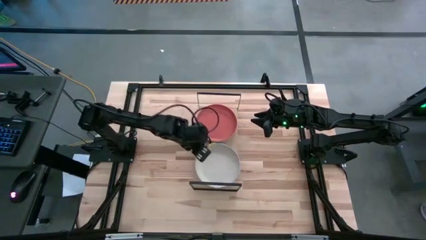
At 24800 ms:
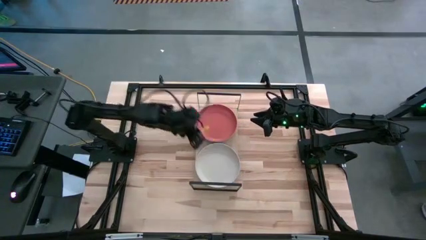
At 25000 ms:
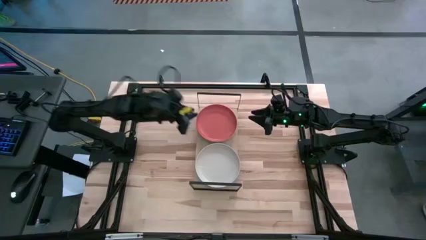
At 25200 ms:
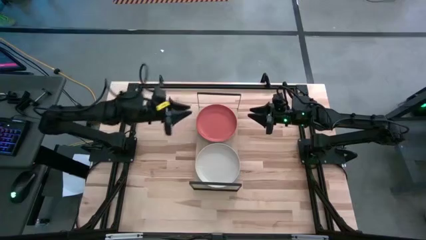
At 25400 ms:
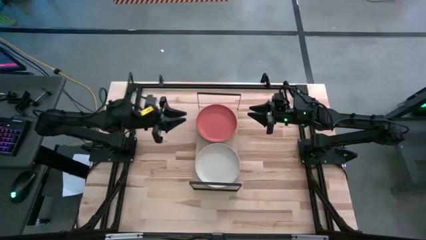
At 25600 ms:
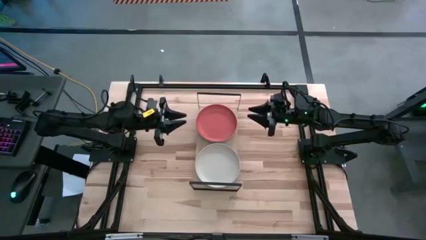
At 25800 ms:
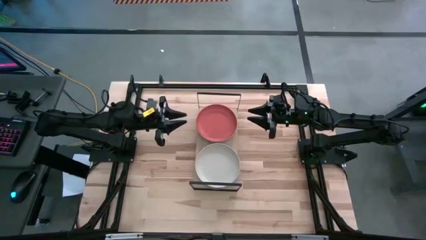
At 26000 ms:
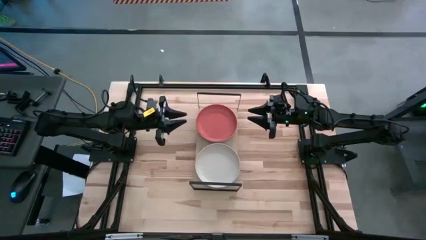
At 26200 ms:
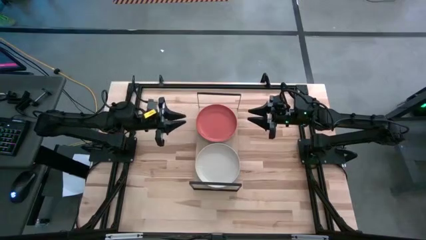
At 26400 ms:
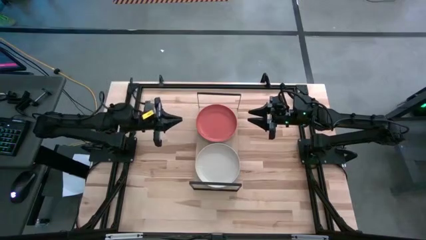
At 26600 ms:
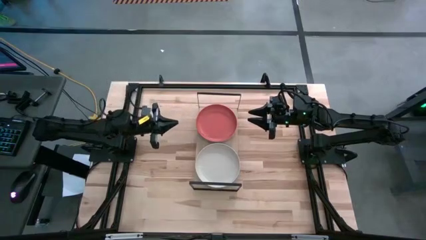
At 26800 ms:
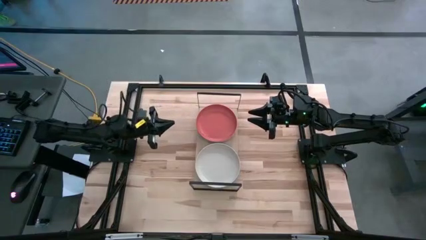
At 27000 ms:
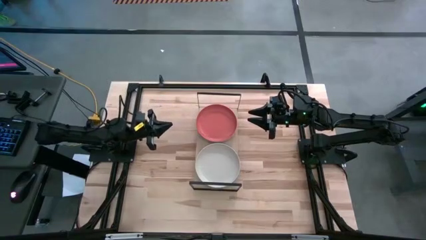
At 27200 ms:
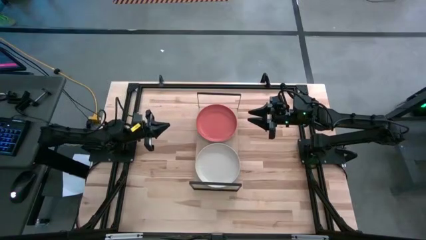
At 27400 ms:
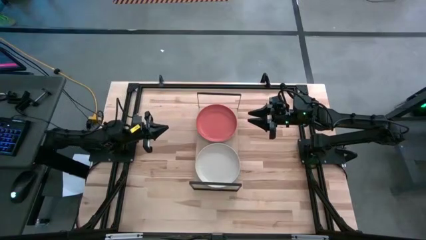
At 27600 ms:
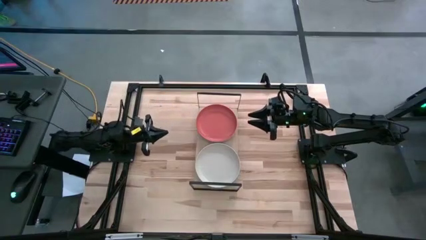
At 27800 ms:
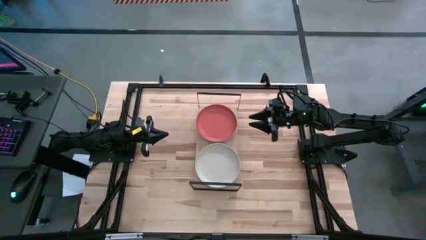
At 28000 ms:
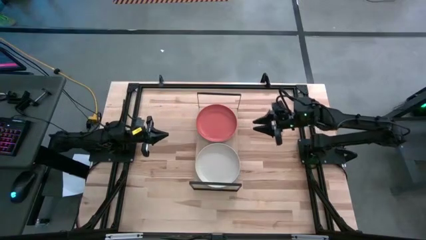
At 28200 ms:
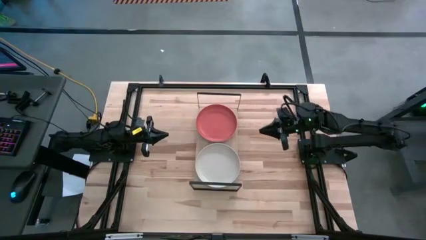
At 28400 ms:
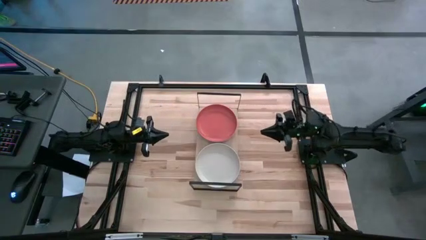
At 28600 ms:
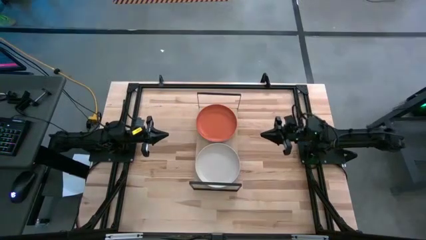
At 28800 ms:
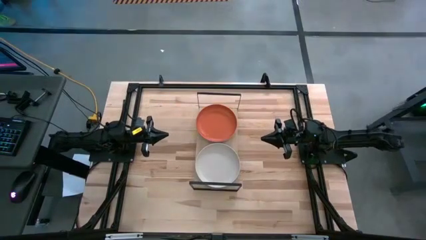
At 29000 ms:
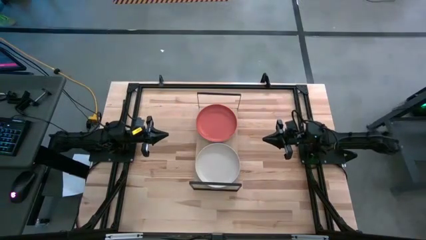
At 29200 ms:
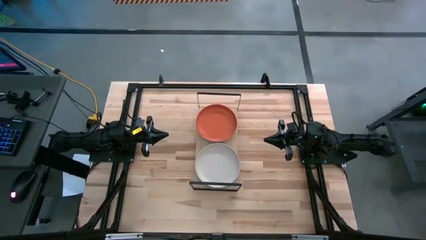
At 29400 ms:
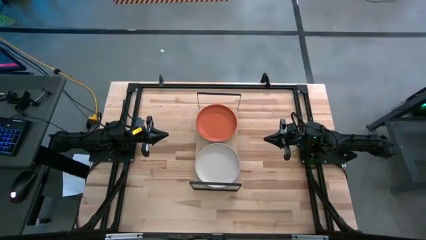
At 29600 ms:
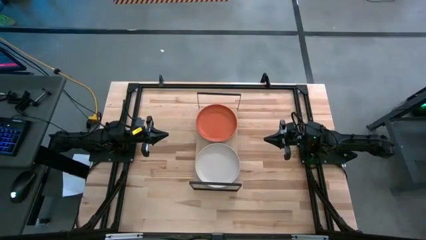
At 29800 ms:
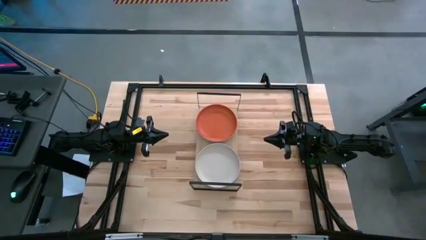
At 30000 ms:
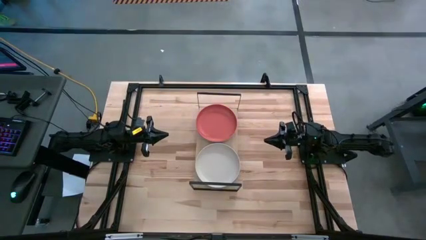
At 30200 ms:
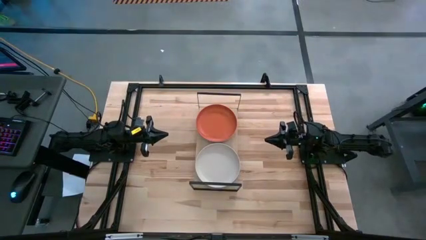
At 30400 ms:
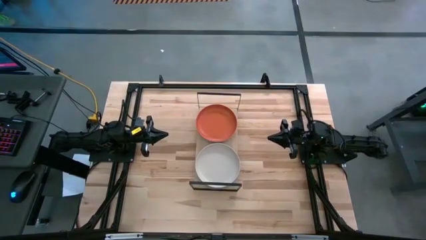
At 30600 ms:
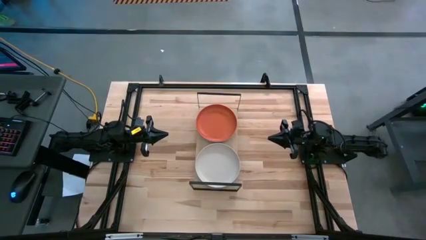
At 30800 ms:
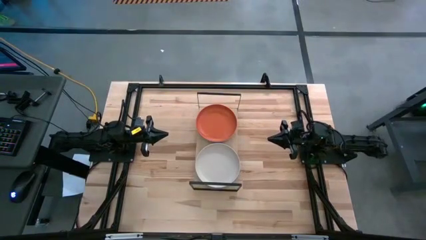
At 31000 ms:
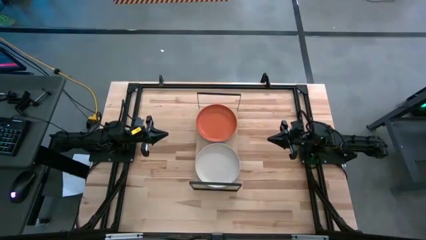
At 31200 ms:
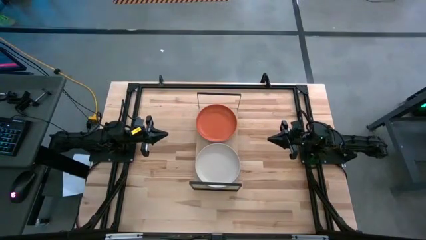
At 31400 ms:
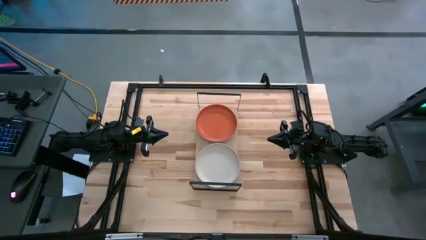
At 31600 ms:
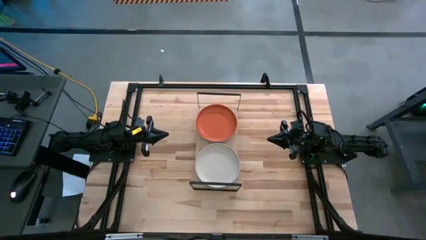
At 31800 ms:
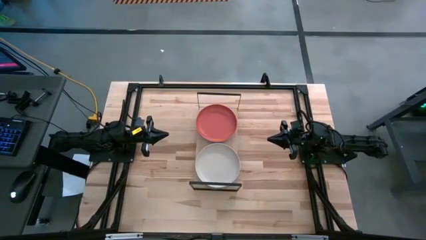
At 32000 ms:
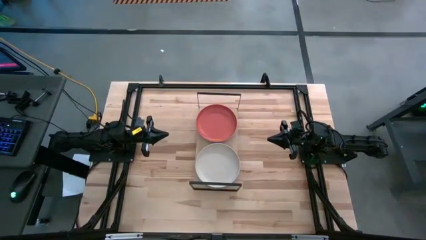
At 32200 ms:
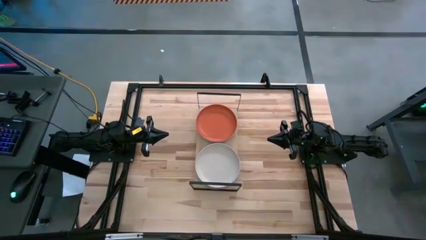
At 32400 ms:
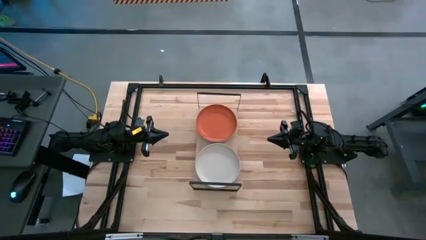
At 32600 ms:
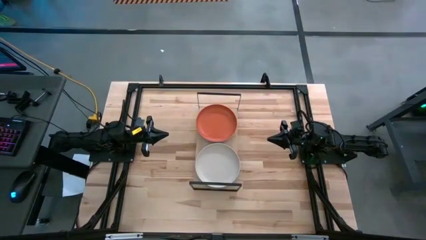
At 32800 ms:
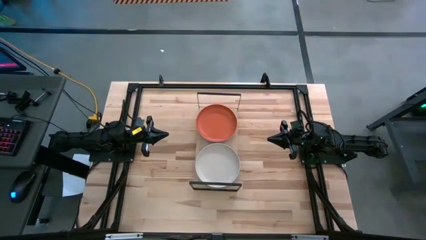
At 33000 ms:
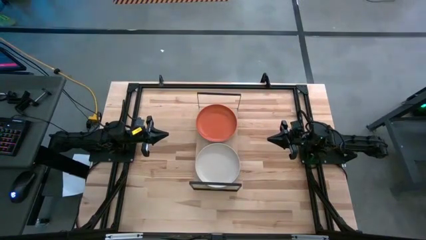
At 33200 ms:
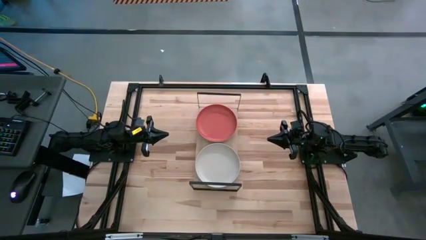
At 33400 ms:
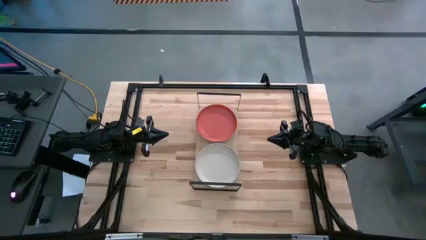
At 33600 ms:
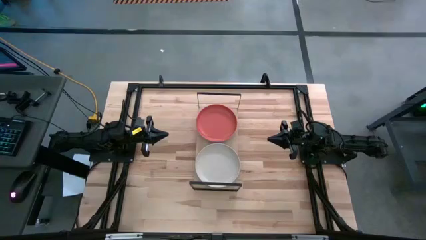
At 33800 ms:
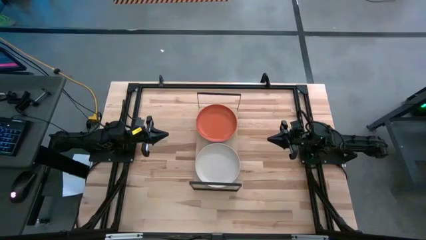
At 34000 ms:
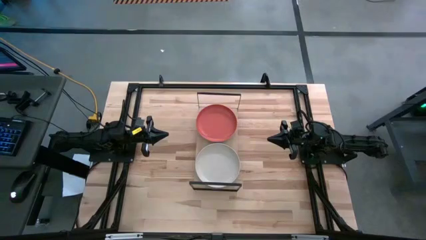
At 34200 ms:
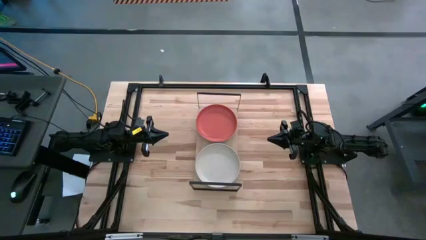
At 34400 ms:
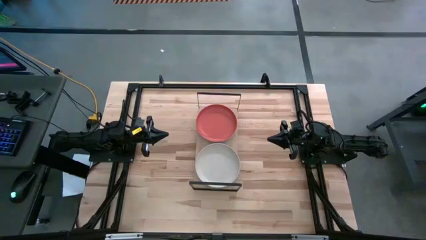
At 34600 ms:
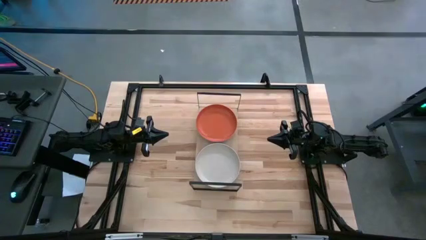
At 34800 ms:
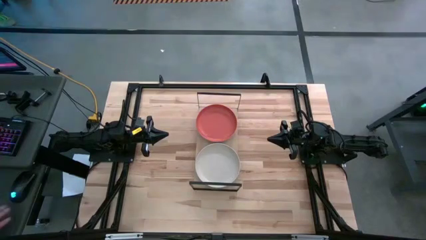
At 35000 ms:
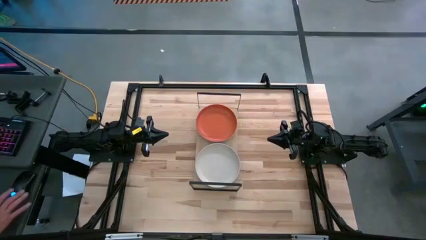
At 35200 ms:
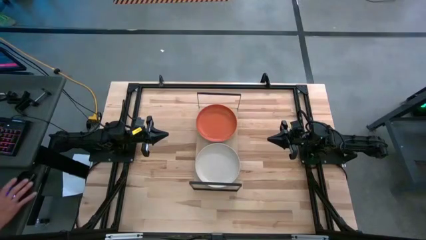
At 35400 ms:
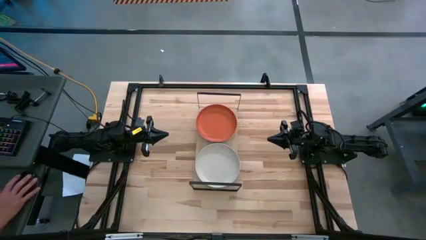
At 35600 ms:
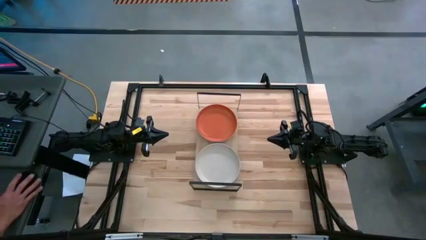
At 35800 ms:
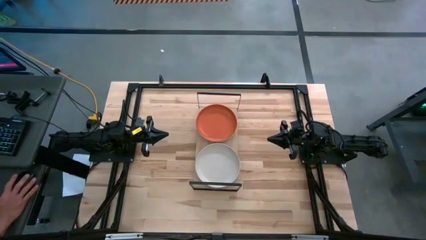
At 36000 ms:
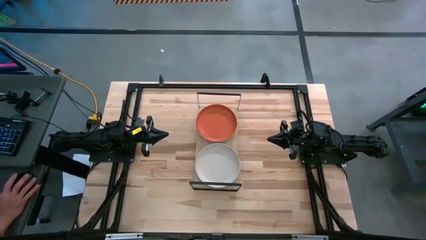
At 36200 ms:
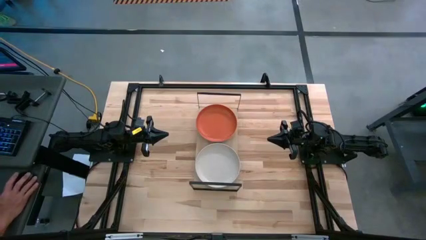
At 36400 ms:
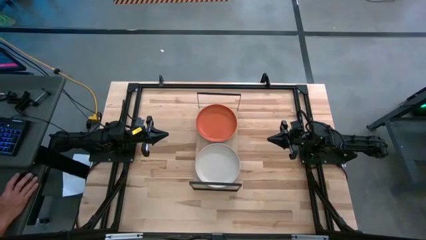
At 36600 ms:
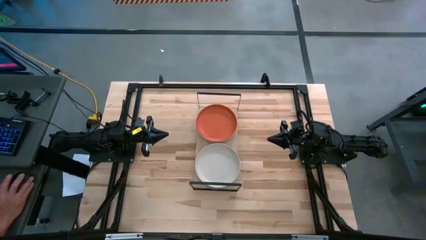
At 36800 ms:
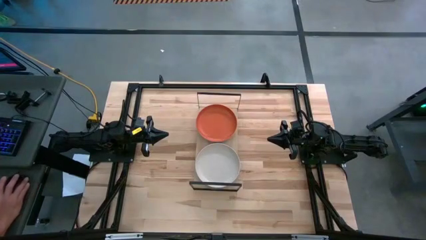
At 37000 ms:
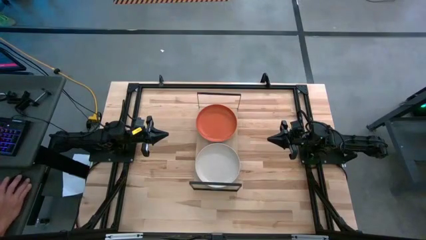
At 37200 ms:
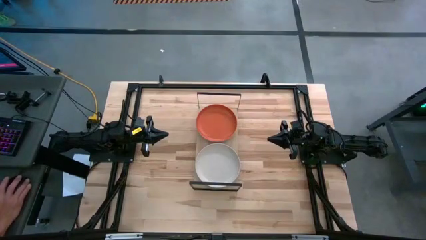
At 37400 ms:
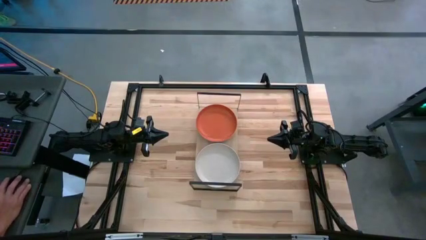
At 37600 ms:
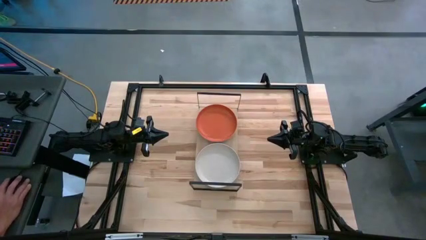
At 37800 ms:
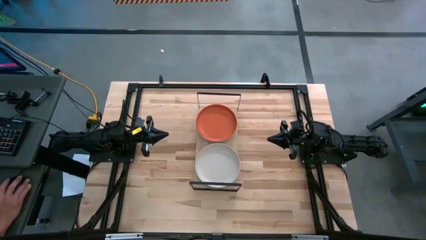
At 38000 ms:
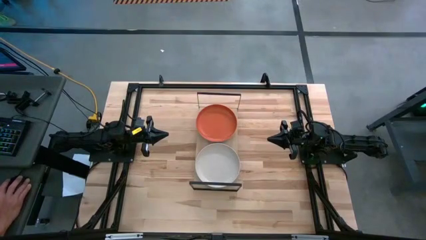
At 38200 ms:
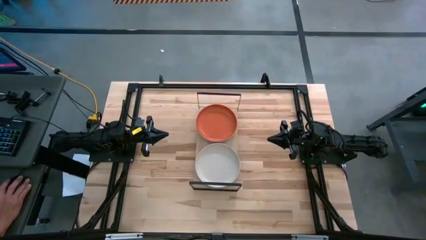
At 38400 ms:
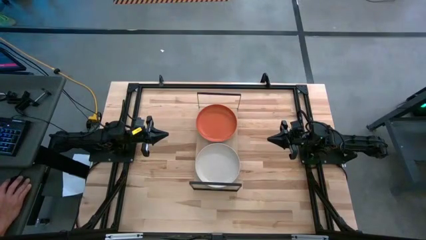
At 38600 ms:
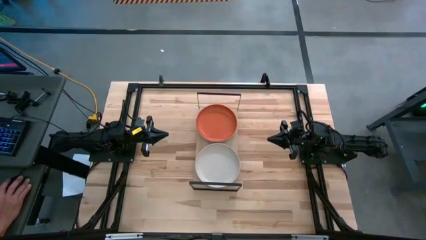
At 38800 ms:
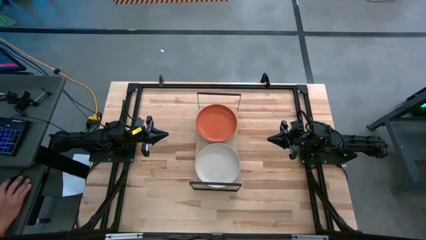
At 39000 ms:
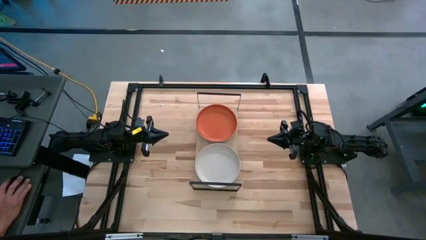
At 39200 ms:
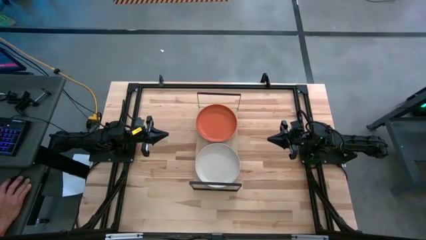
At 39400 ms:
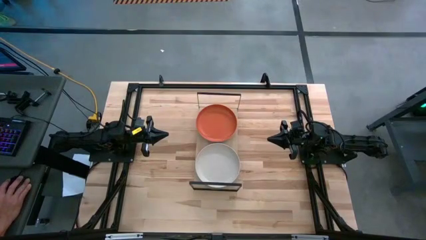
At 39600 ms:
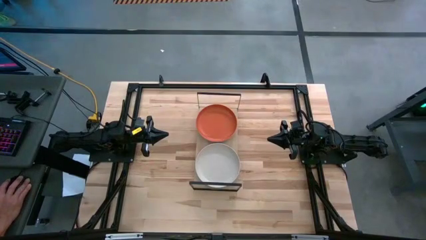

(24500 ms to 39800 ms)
Task: Place and stack plates onto a shelf
Return to Home Position
